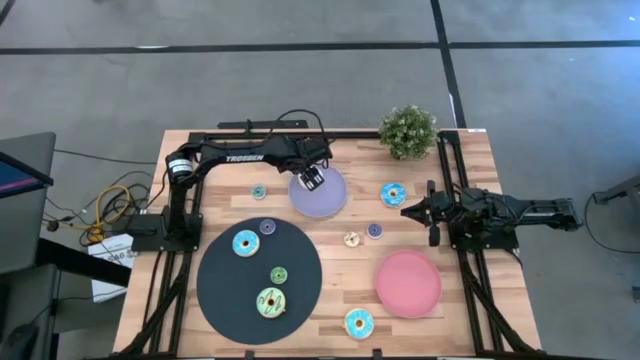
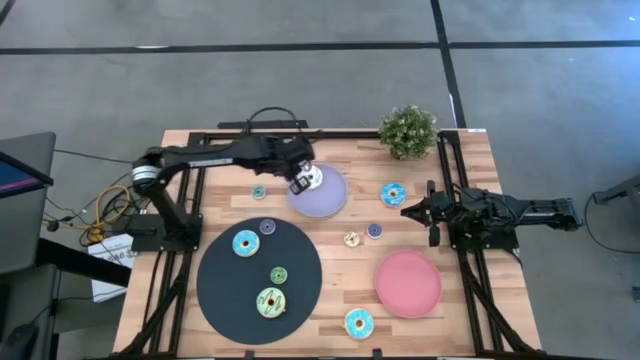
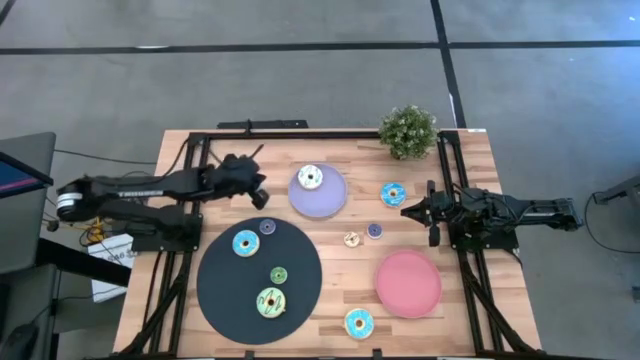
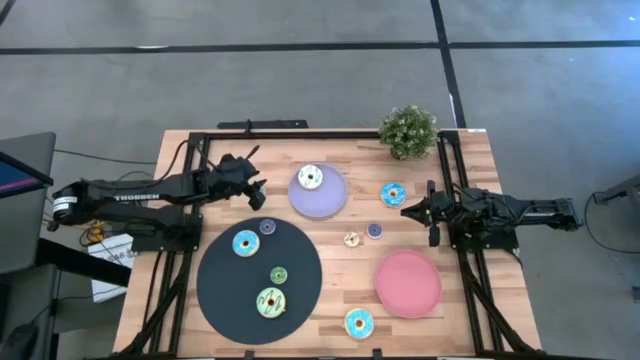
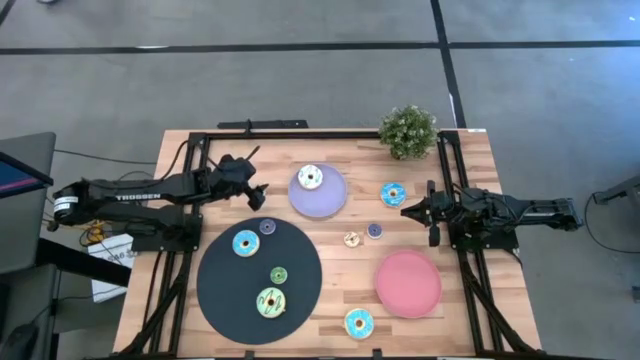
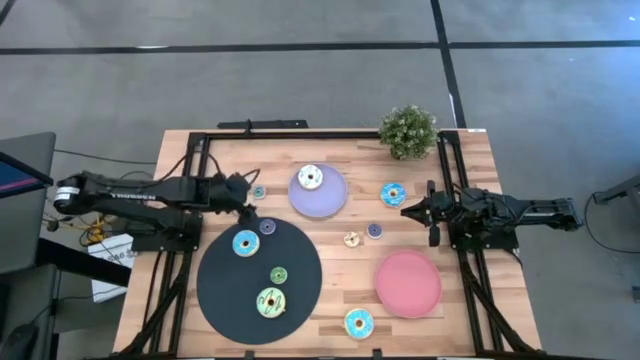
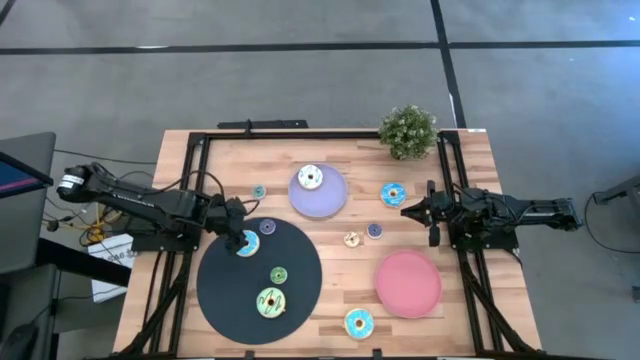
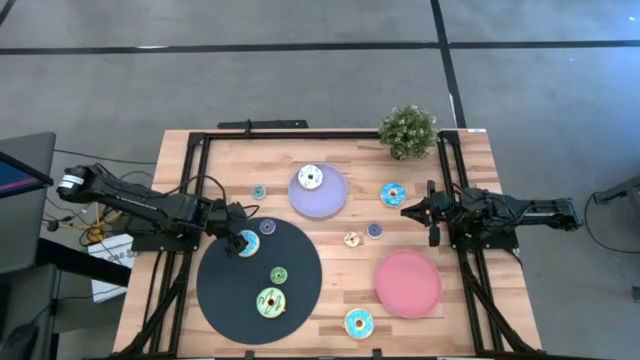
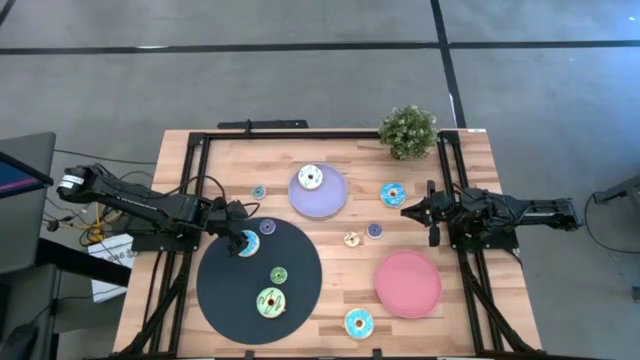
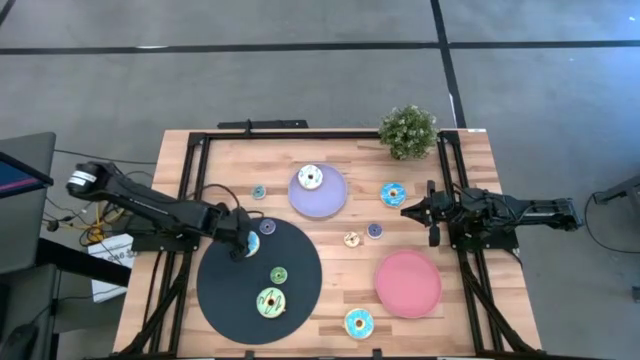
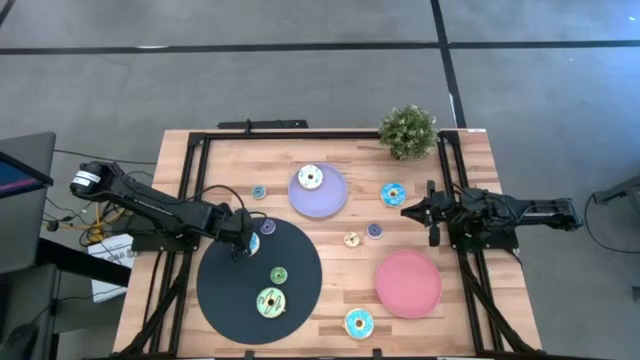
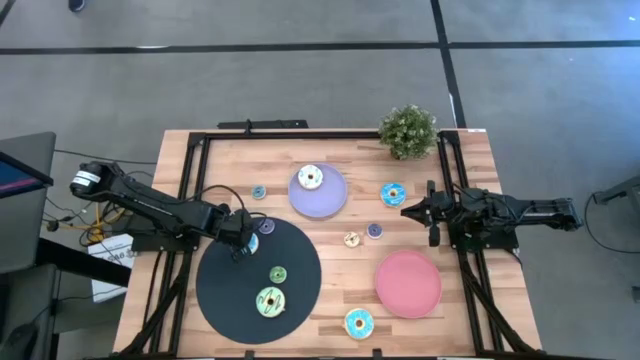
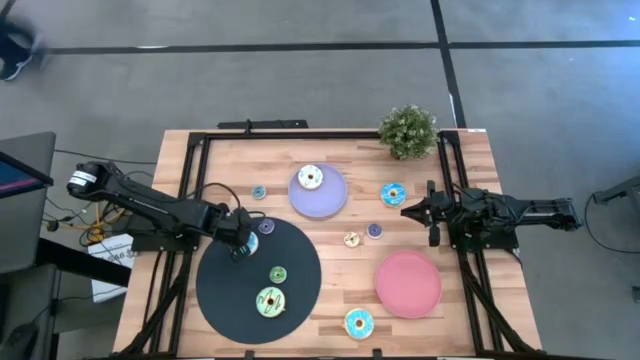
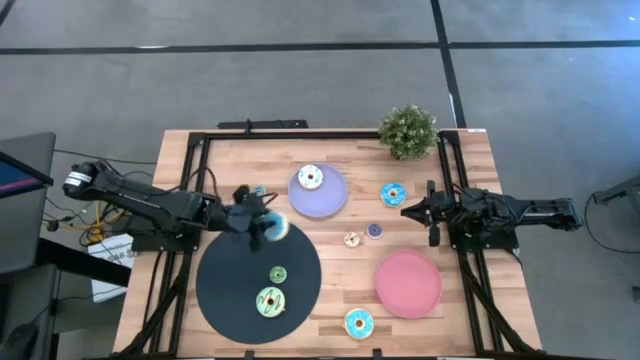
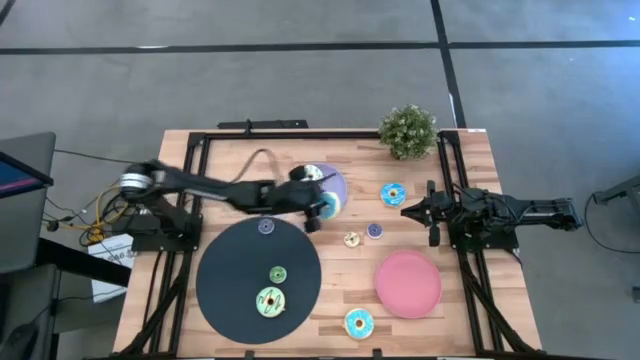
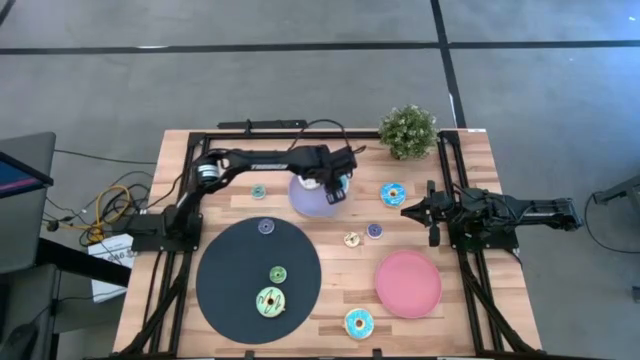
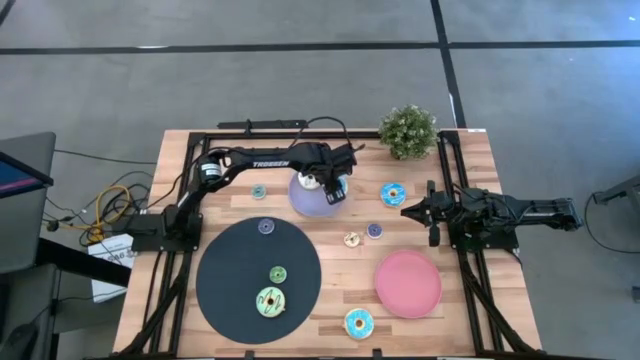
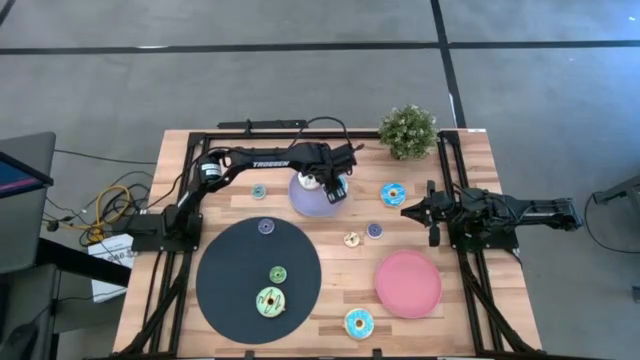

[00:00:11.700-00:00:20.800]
Task: Pick & Place donuts
Put the top large light blue donut on the purple plate

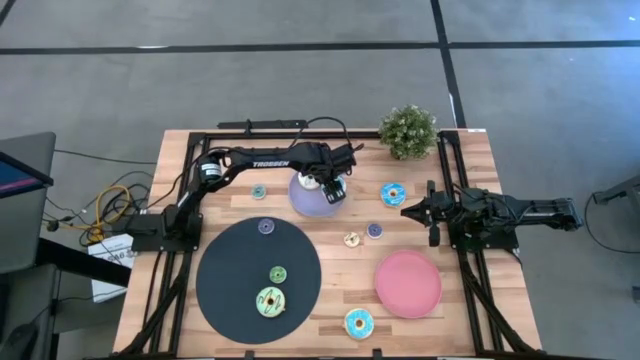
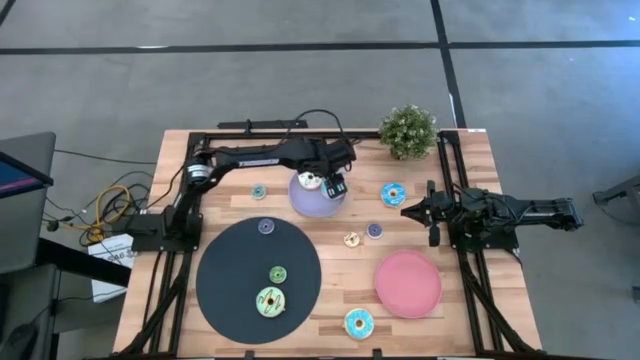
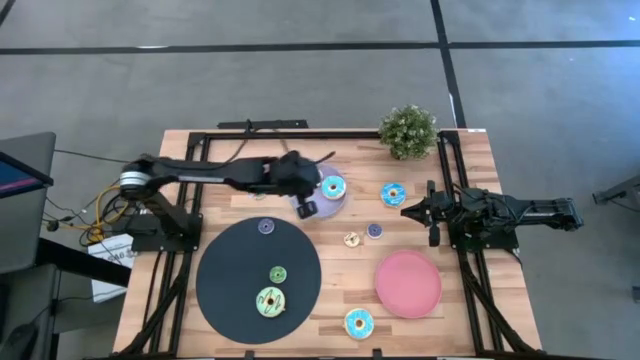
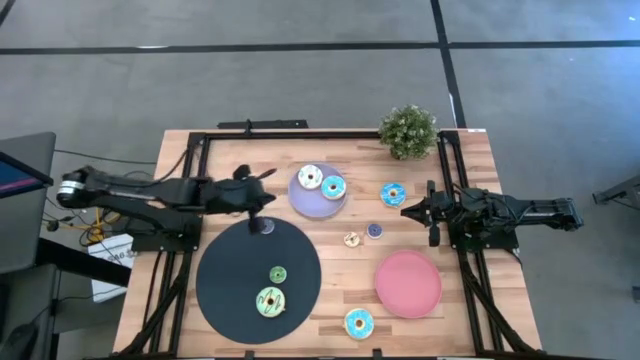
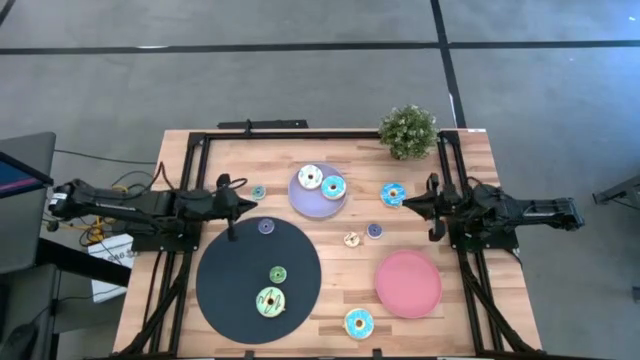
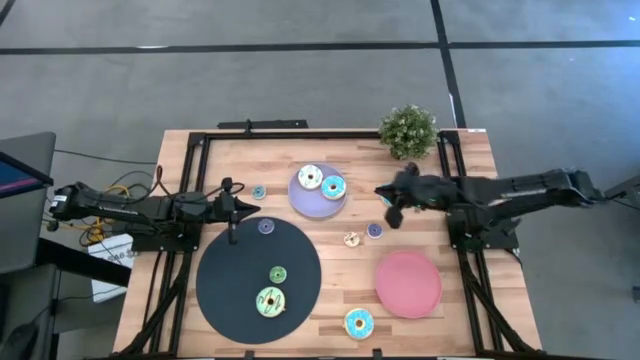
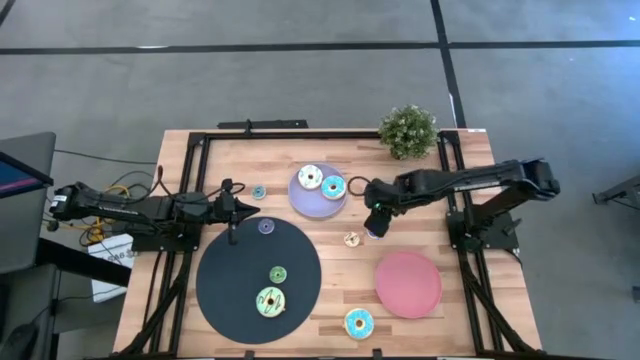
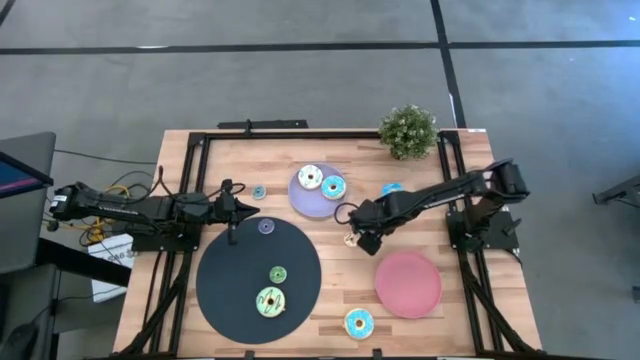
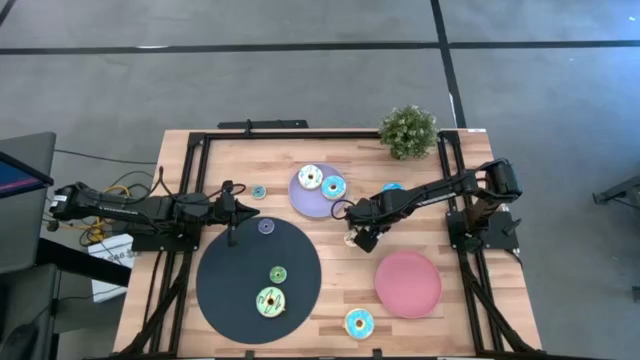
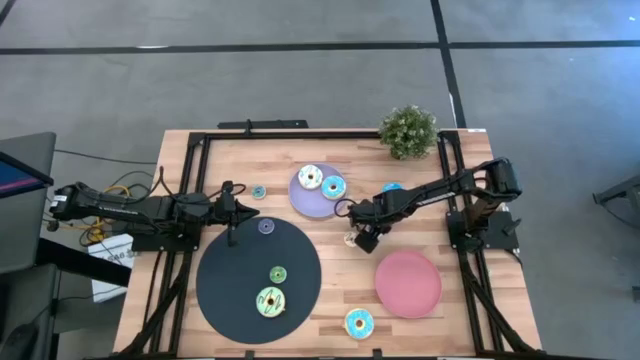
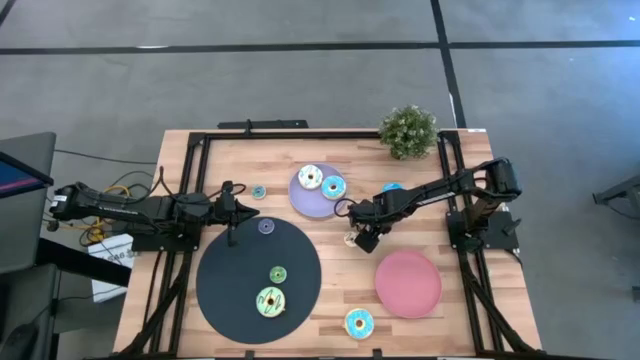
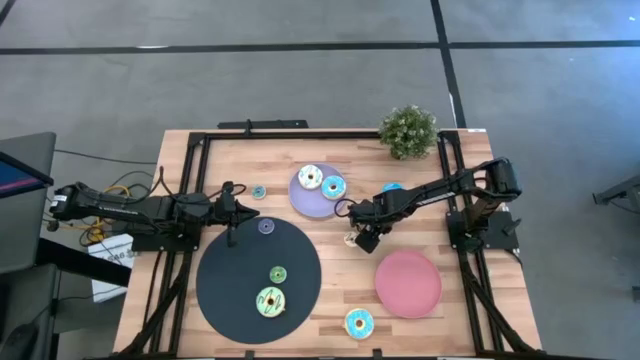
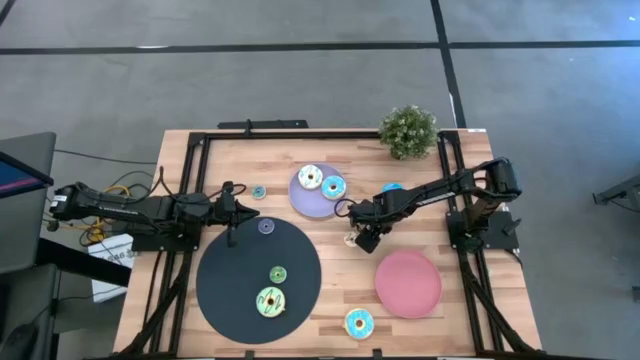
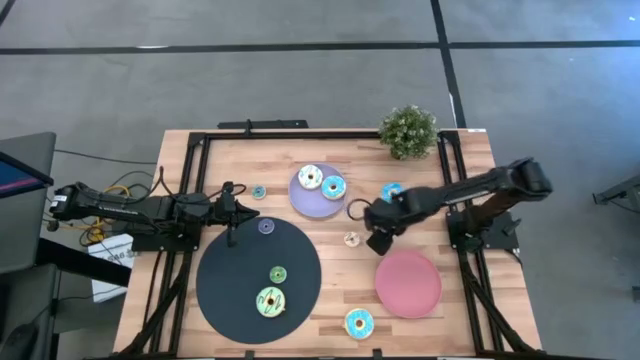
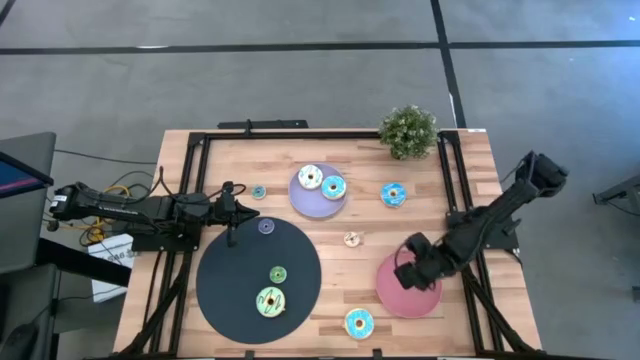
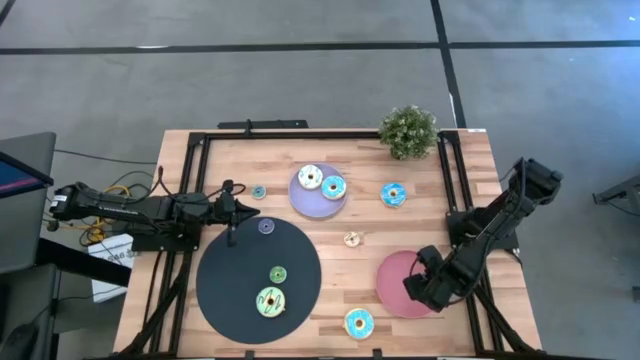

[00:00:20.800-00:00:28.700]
Put the right small blue donut on the pink plate

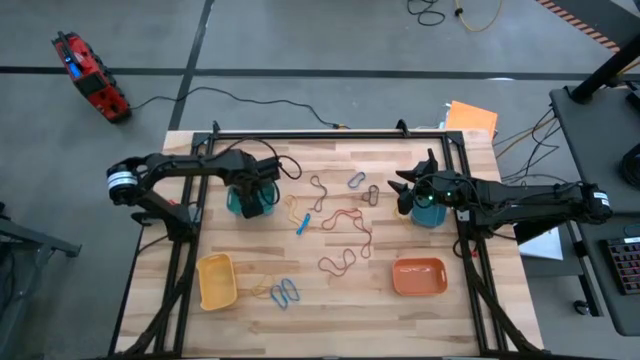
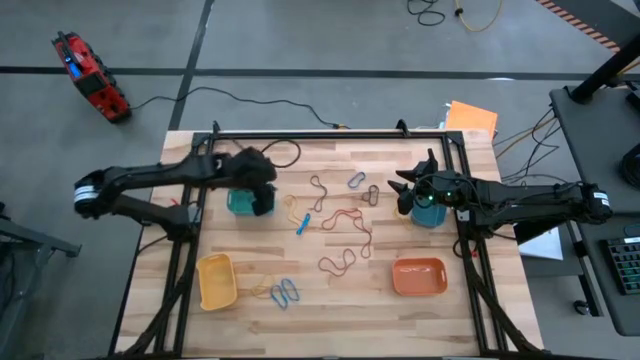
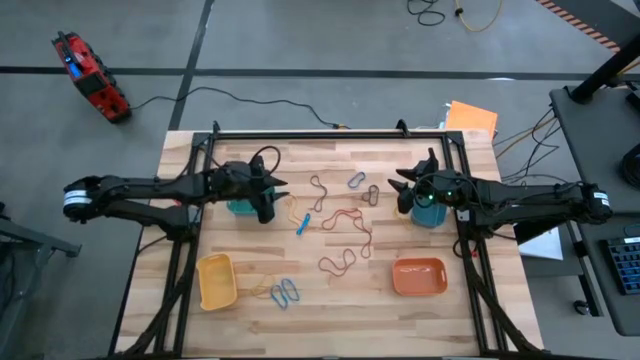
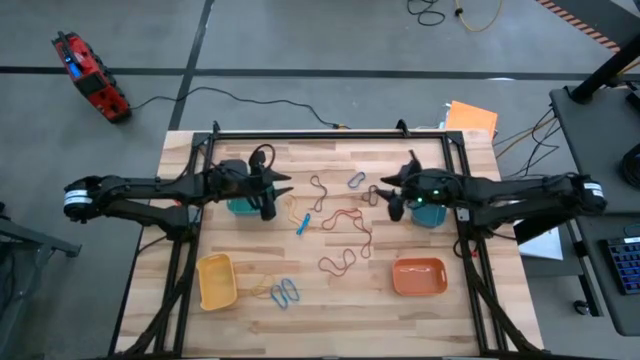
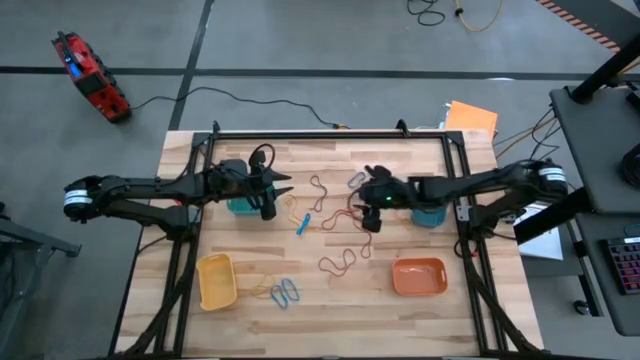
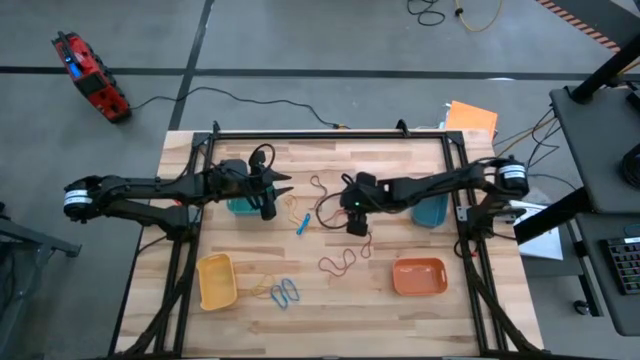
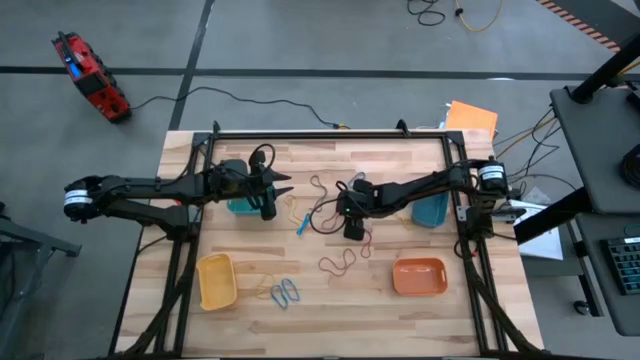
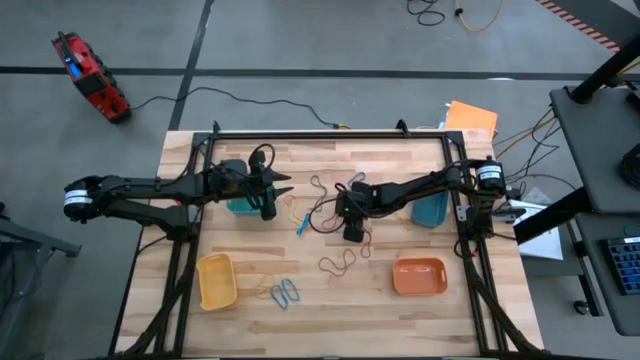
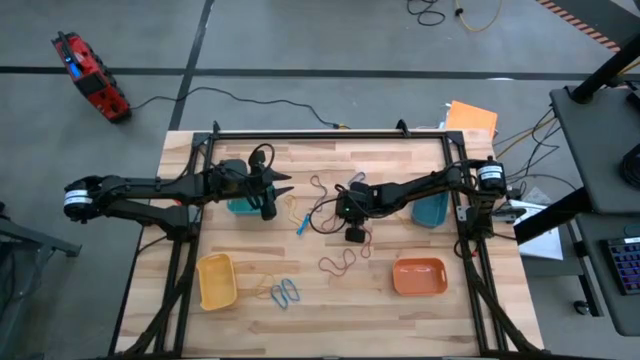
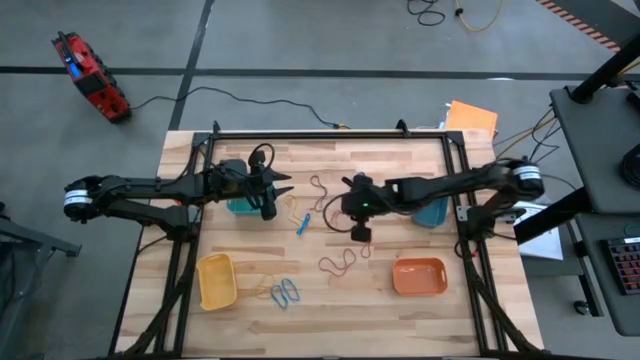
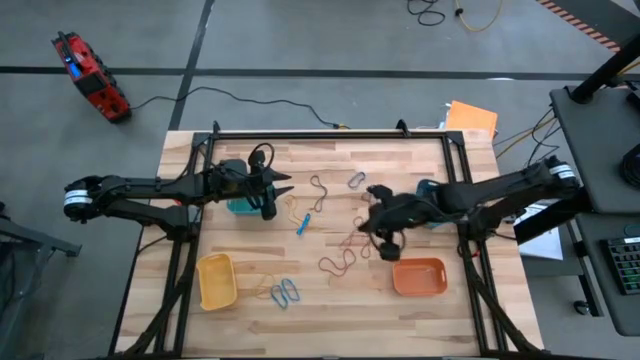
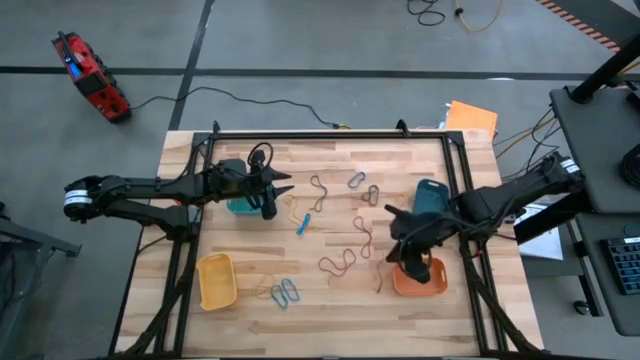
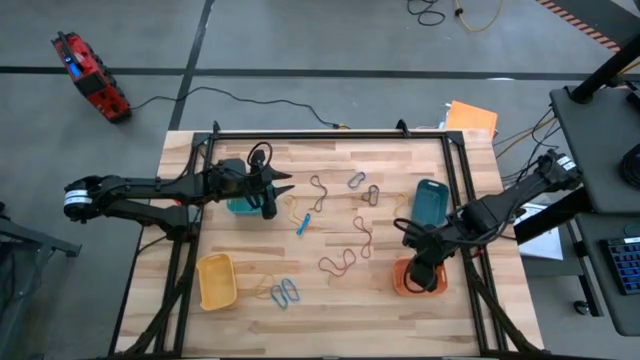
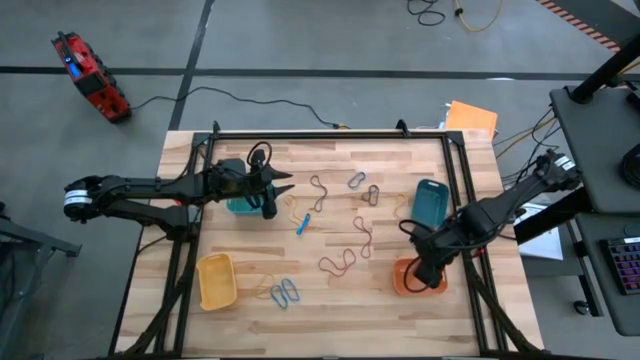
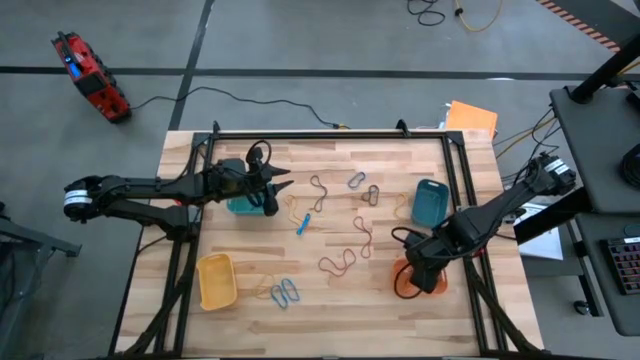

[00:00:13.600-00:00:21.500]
Task: Sort rubber bands into baskets
Put the red rubber band into the orange bin
